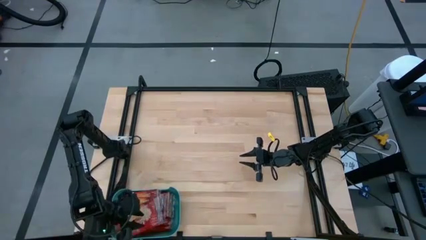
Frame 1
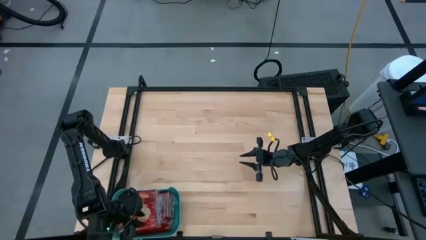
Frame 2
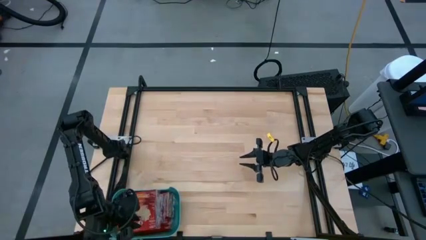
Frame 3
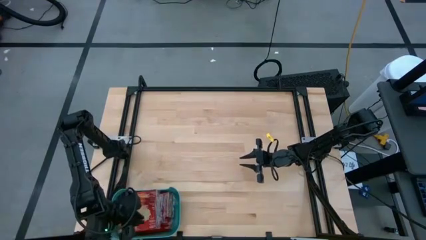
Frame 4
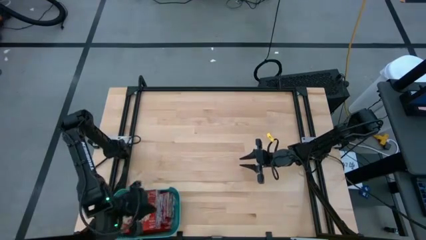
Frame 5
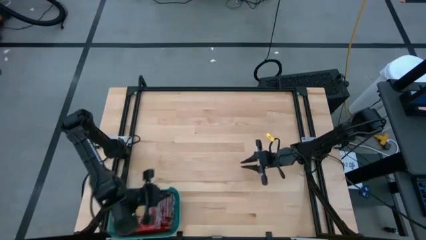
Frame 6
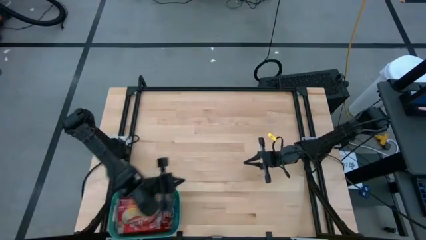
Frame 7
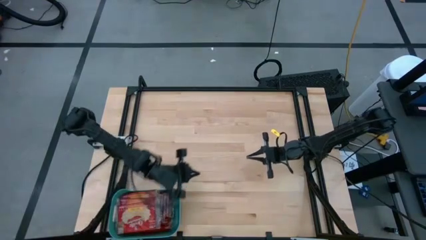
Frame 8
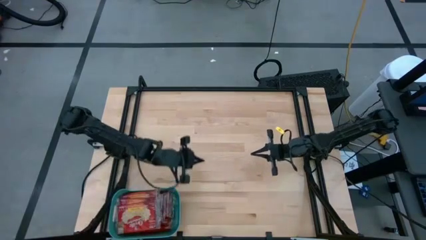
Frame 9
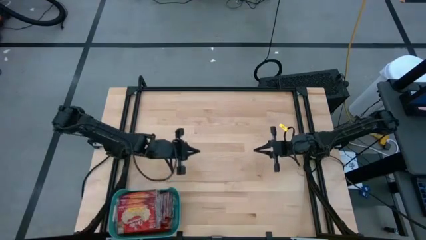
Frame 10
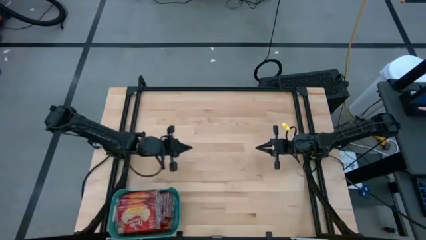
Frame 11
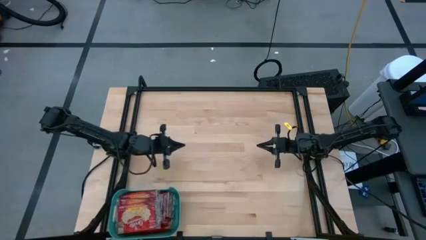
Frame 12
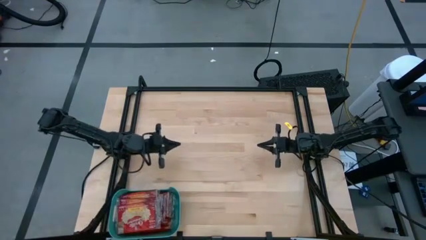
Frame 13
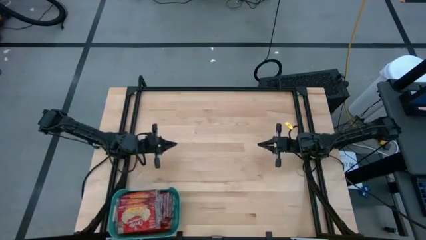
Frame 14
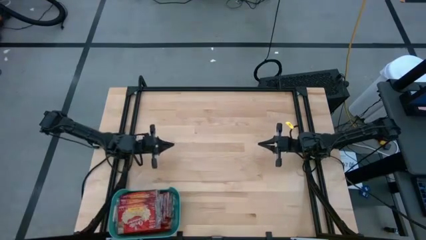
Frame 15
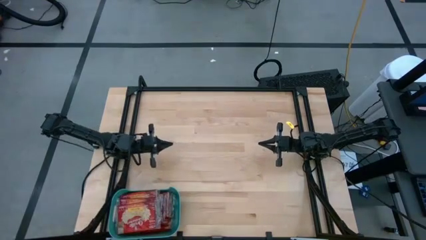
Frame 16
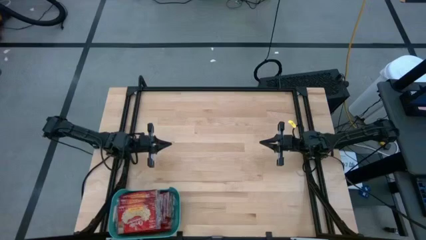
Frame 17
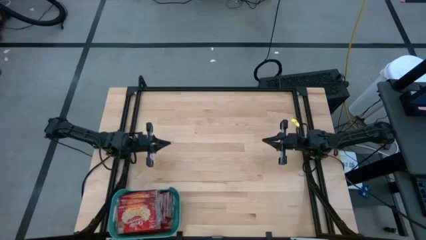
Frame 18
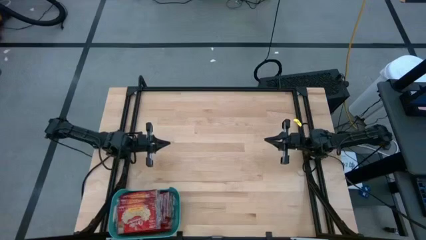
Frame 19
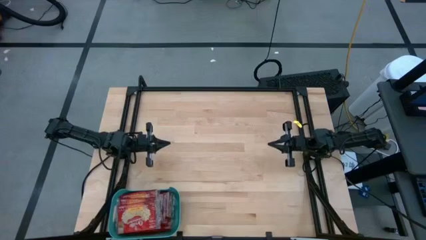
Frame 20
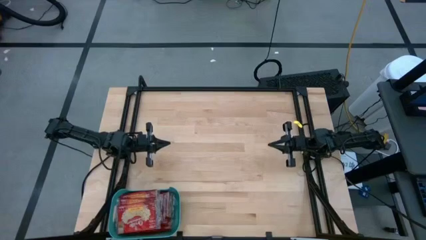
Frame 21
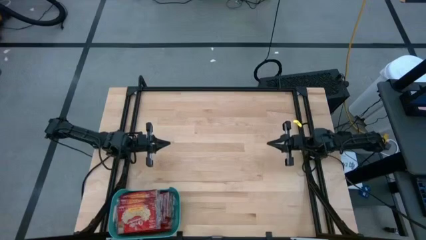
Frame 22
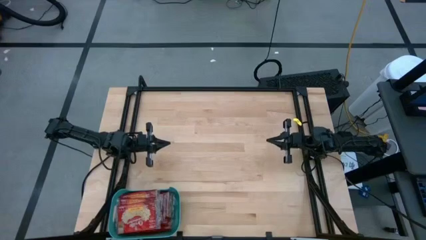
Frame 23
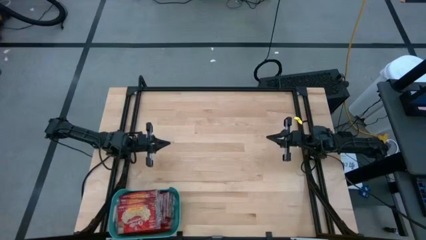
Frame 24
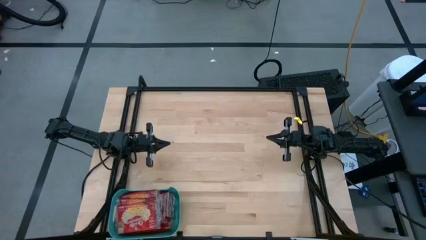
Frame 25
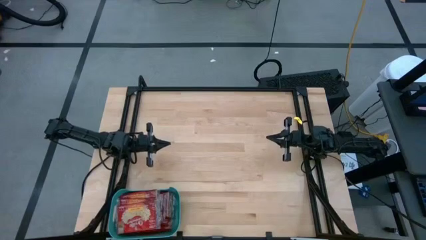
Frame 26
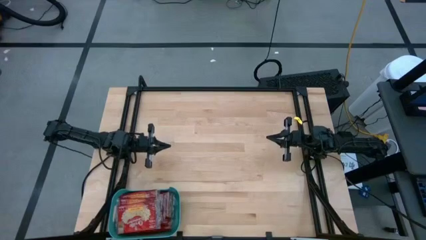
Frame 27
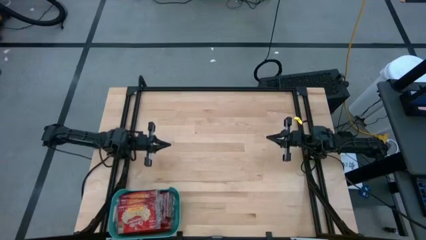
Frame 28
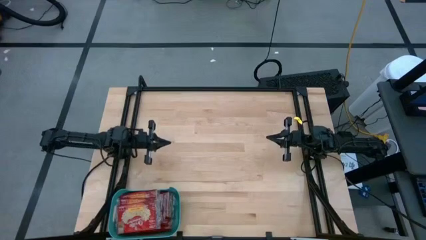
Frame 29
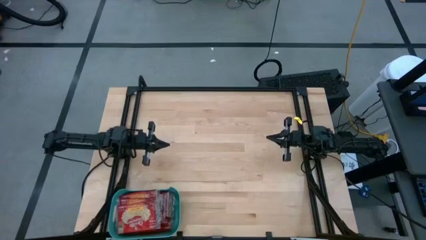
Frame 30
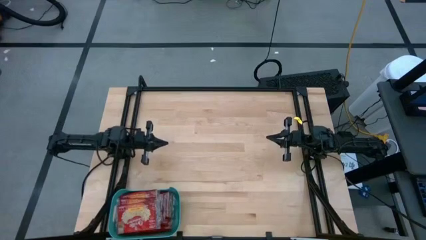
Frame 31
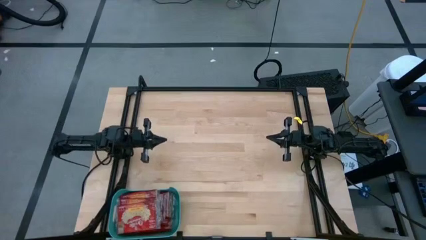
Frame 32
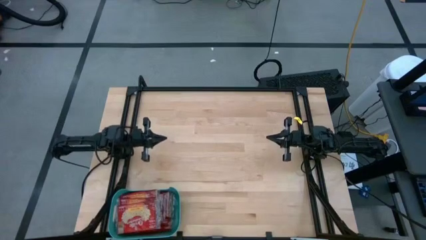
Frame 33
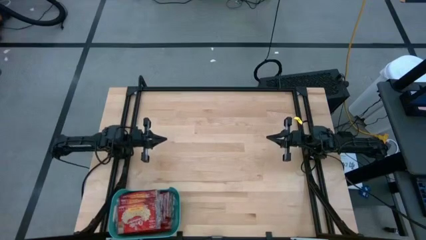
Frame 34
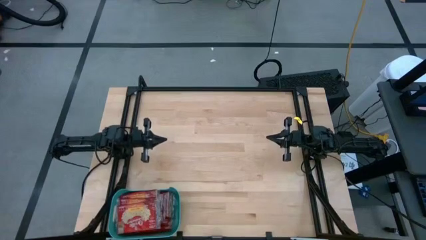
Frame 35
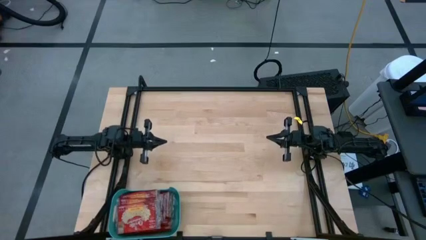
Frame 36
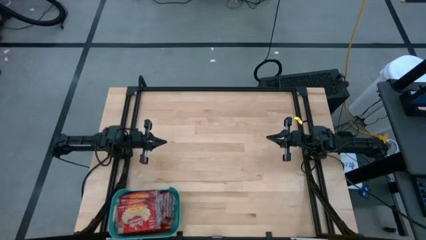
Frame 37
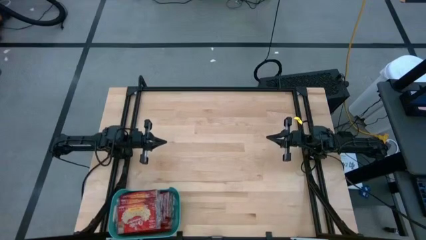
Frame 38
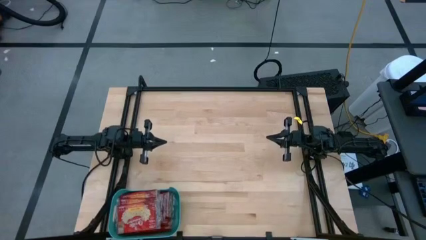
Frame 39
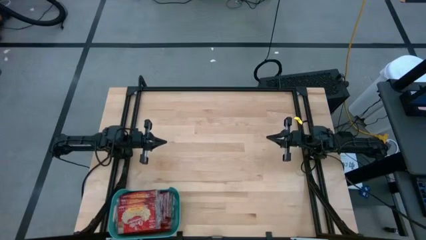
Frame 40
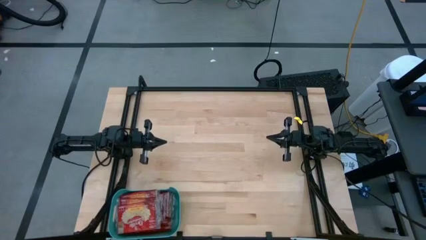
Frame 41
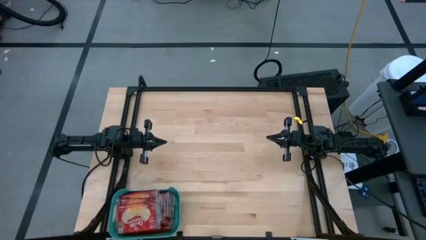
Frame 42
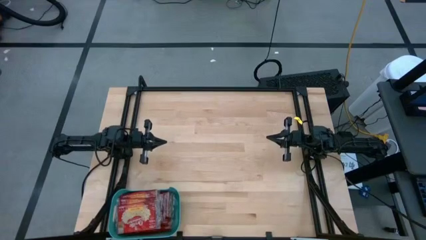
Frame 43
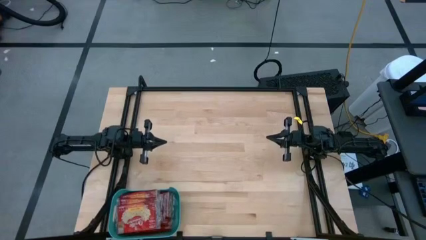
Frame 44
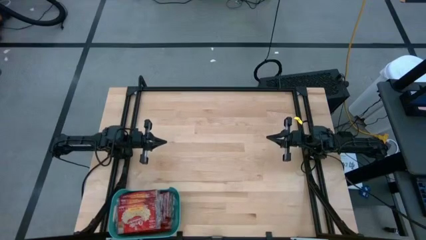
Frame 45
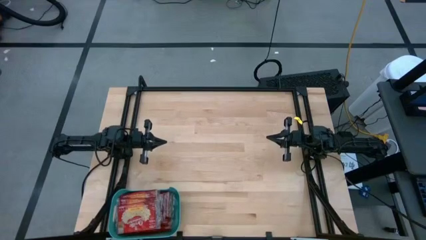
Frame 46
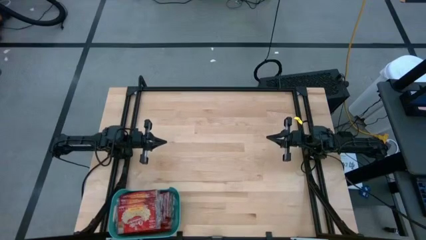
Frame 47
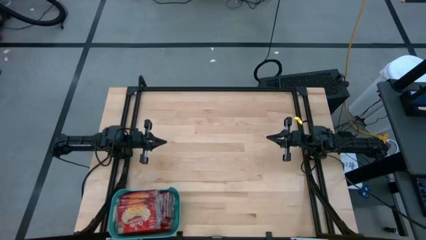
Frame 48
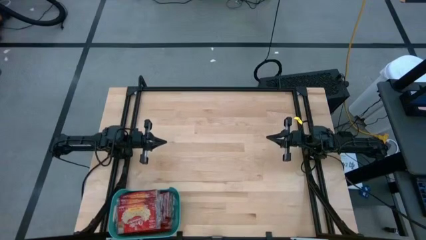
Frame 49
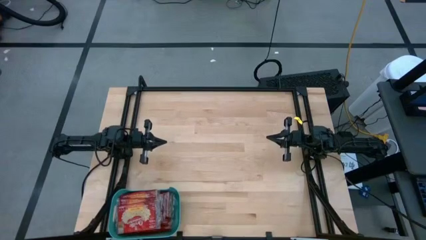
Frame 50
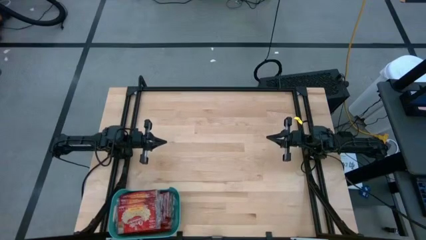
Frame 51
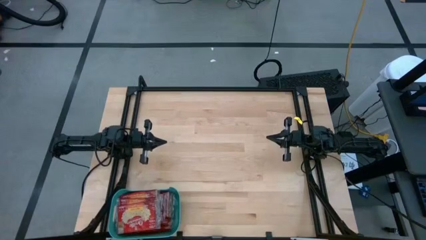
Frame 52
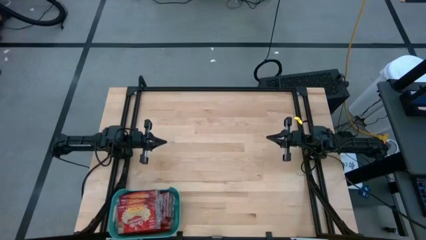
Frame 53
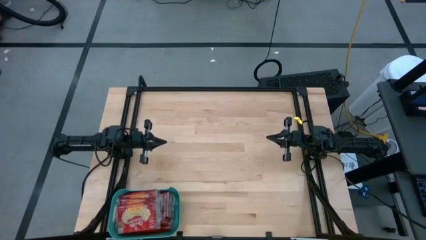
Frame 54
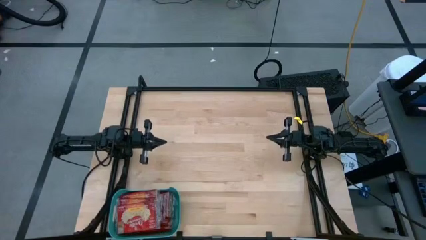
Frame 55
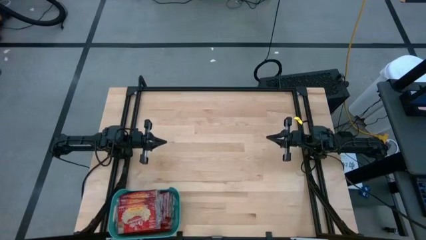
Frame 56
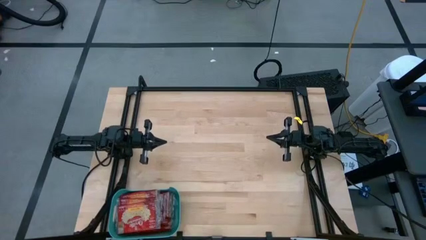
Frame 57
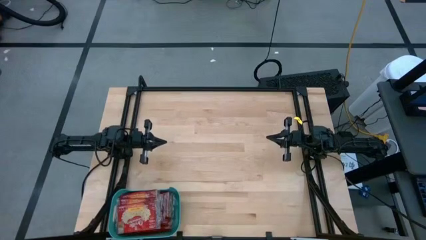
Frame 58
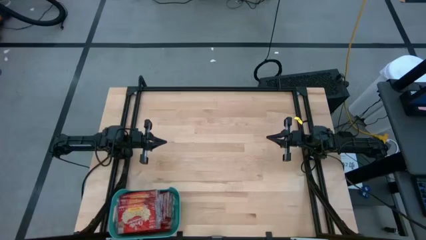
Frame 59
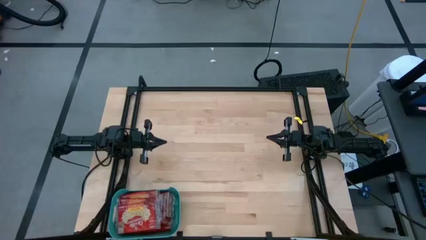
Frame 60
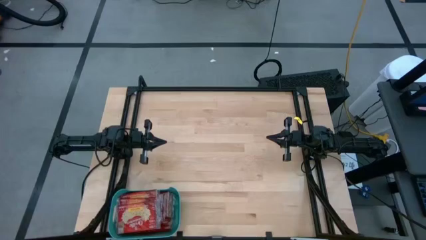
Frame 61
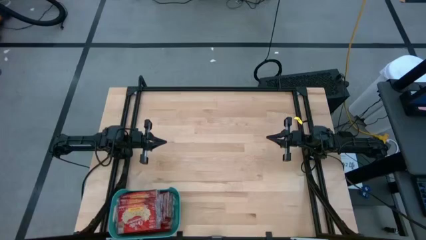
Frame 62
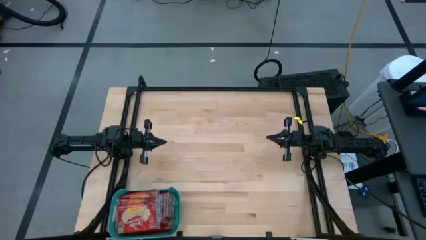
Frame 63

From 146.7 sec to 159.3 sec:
Task: Sort popcorn bags into baskets
Return to Home Position

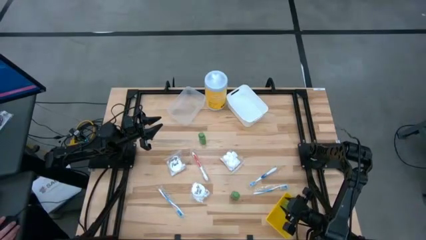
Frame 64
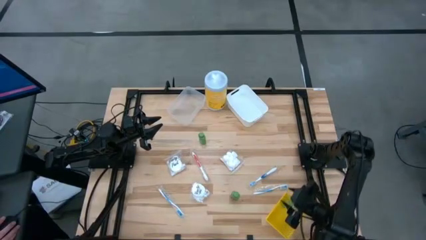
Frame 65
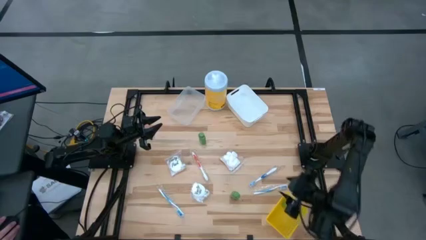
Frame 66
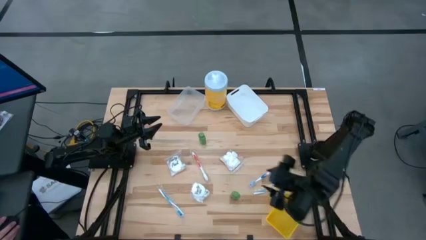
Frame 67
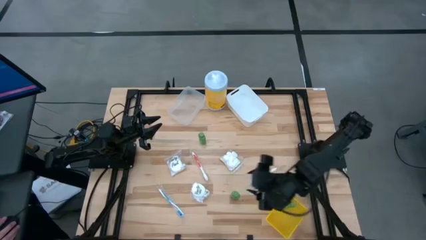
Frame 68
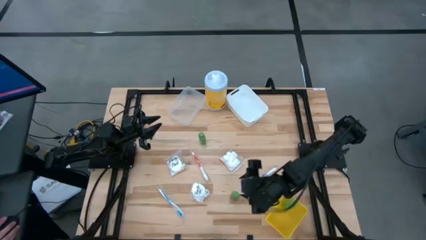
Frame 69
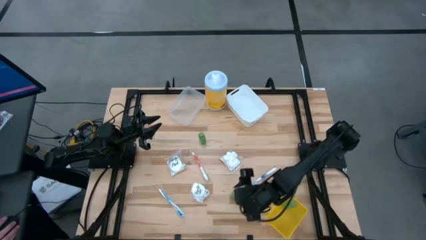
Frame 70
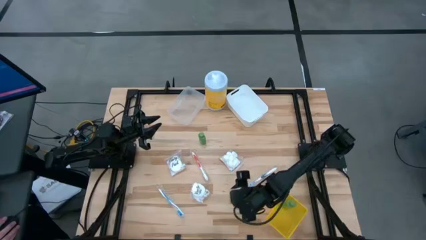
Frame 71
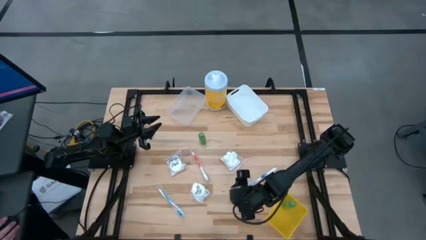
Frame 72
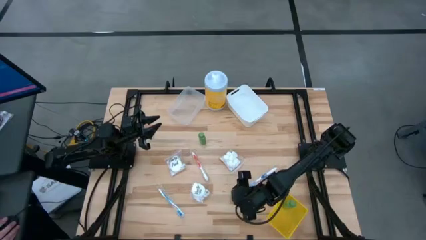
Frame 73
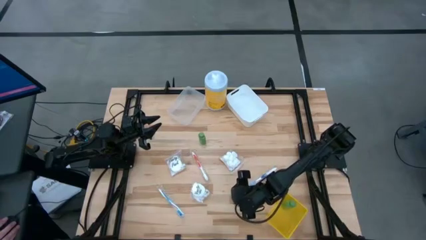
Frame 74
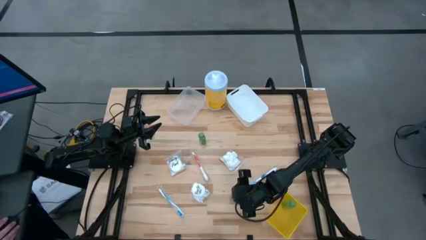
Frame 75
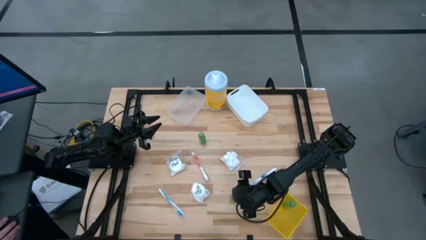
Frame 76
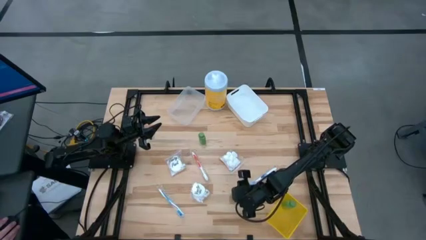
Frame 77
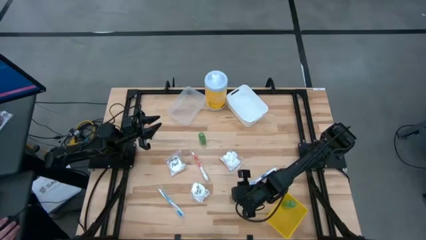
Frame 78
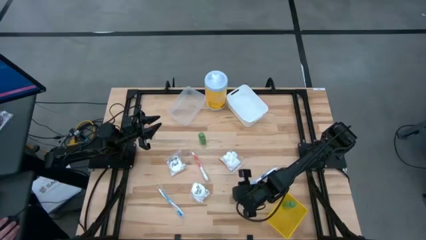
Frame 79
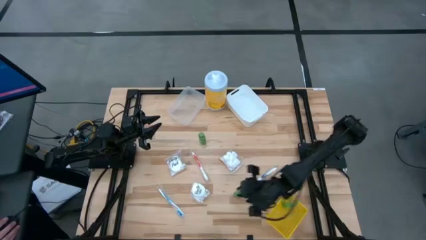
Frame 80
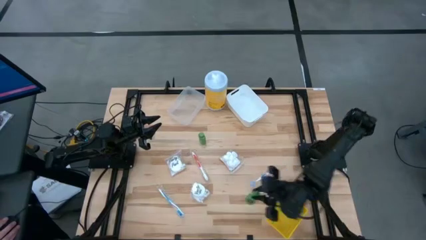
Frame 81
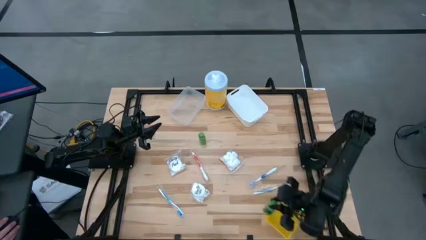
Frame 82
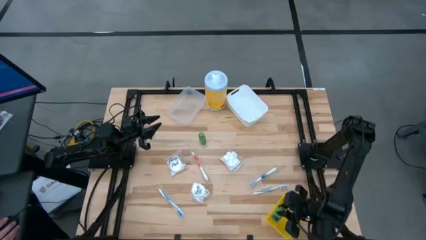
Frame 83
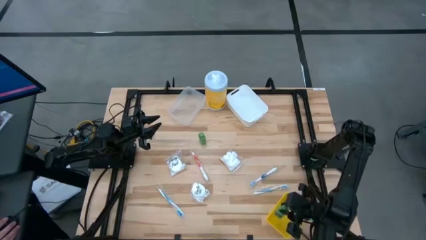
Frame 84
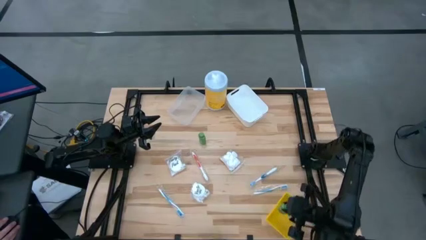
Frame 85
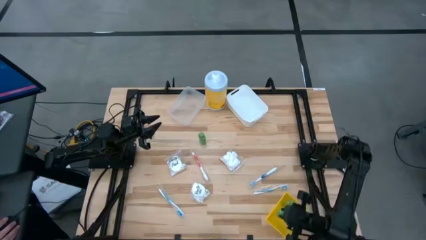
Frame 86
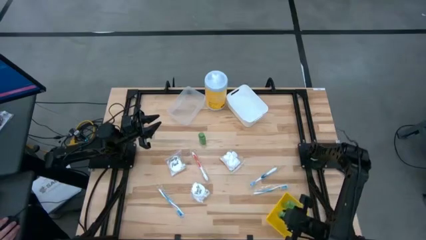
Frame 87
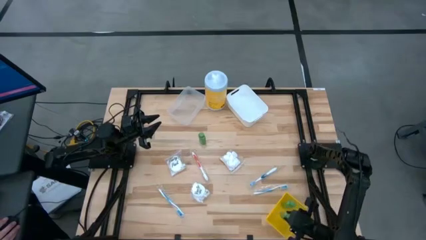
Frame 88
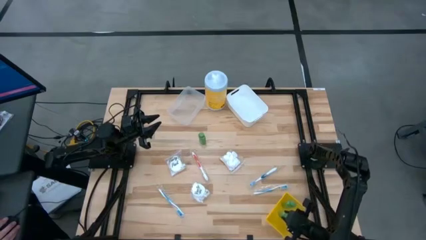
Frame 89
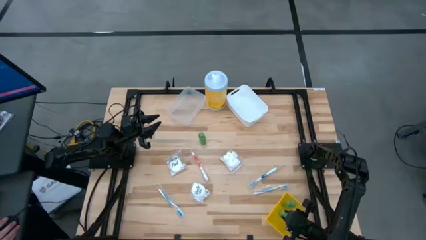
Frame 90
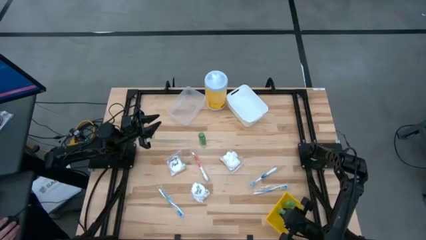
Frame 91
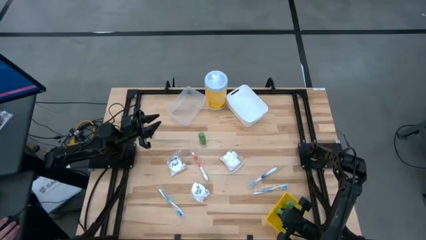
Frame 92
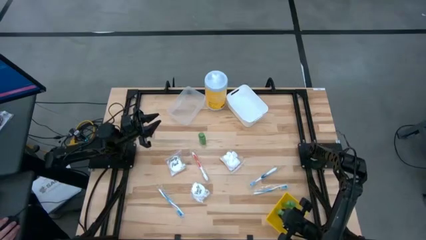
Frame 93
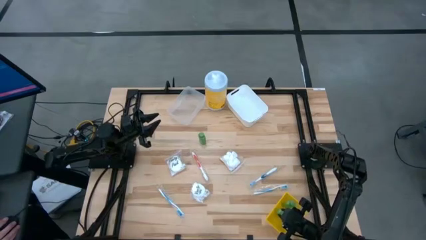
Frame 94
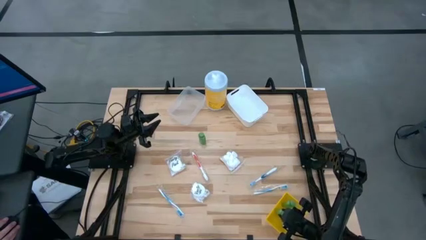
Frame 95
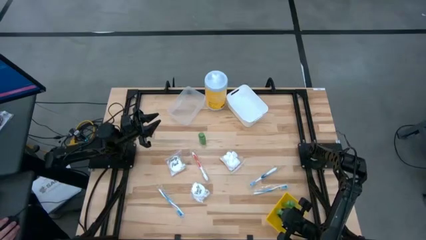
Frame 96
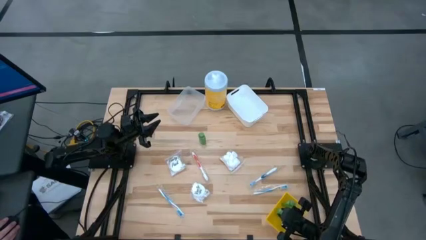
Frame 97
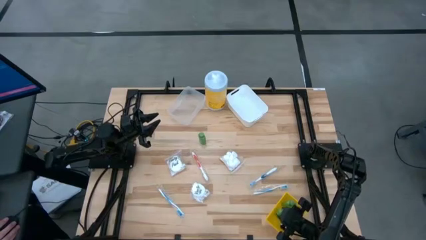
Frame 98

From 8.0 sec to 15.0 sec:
Task: Pick & Place Travel size toiletries
Put the bottom shampoo into the yellow bin
